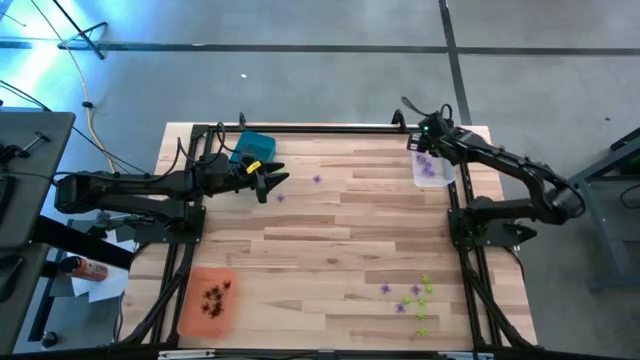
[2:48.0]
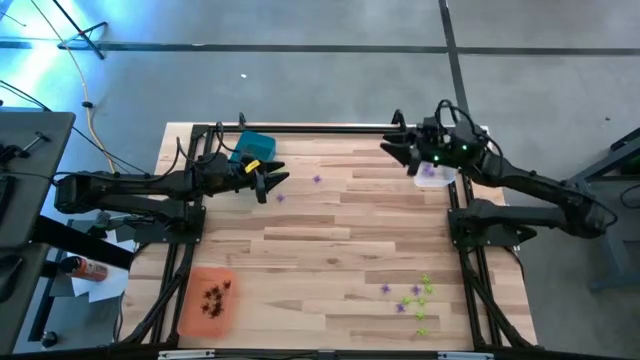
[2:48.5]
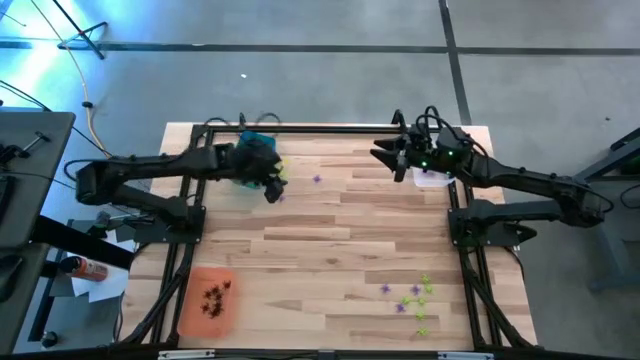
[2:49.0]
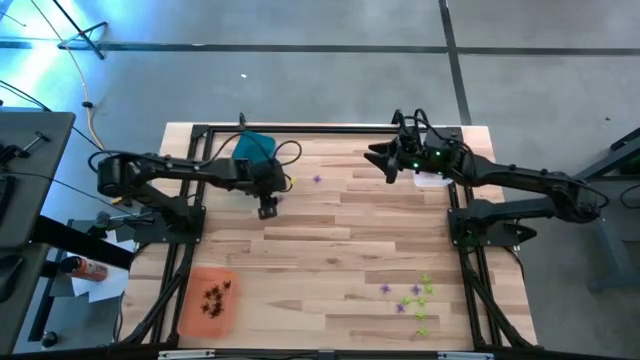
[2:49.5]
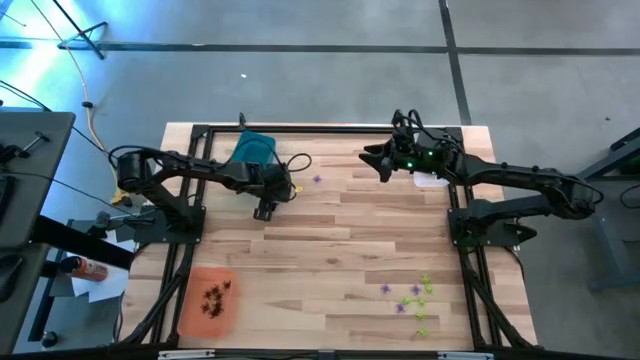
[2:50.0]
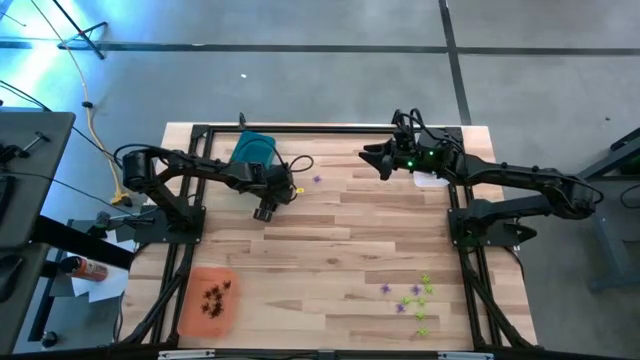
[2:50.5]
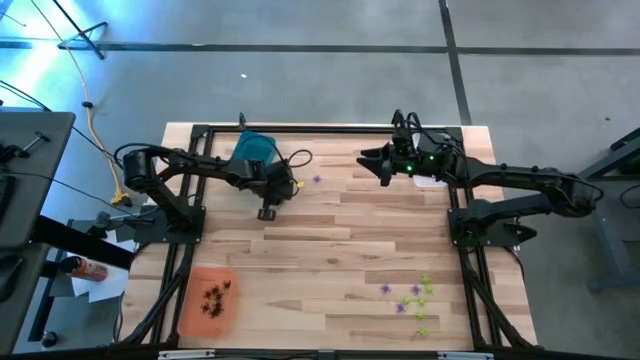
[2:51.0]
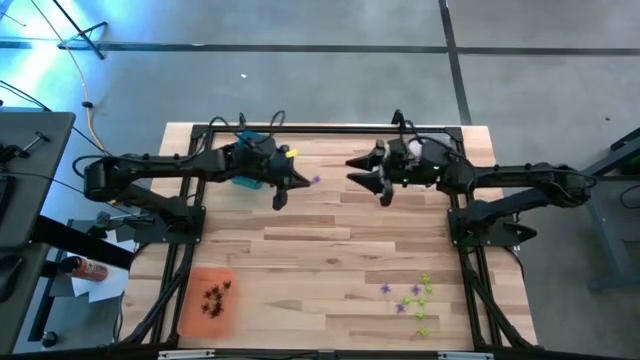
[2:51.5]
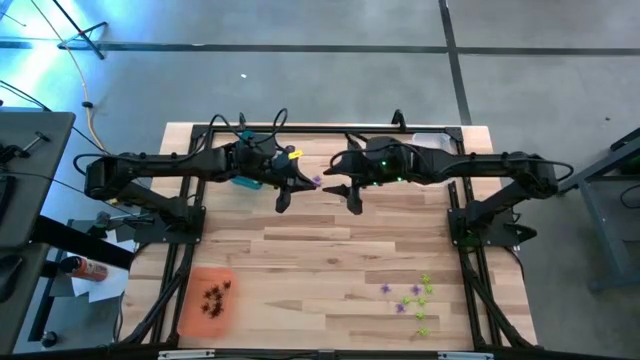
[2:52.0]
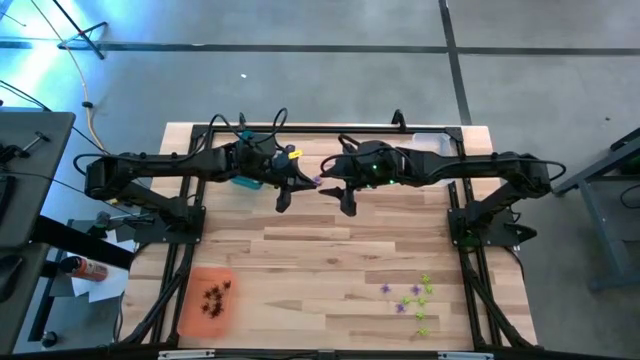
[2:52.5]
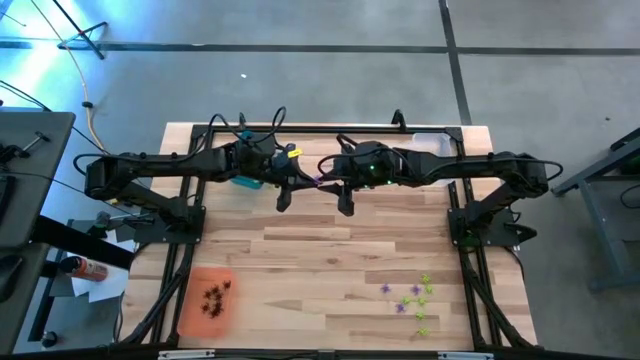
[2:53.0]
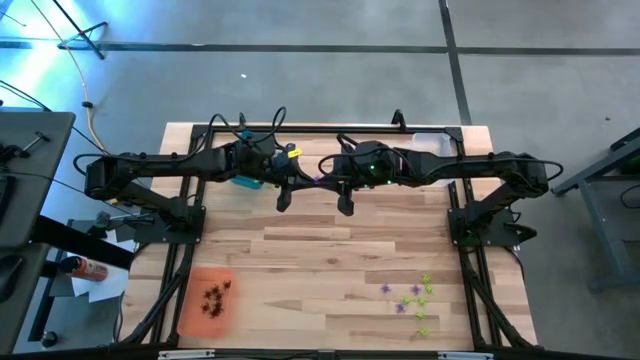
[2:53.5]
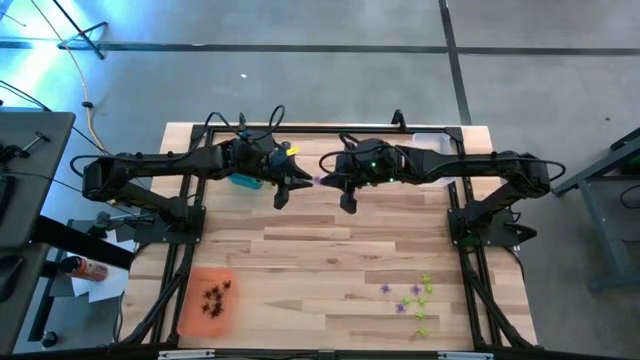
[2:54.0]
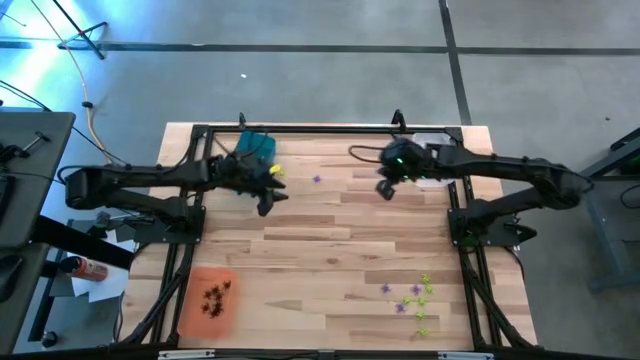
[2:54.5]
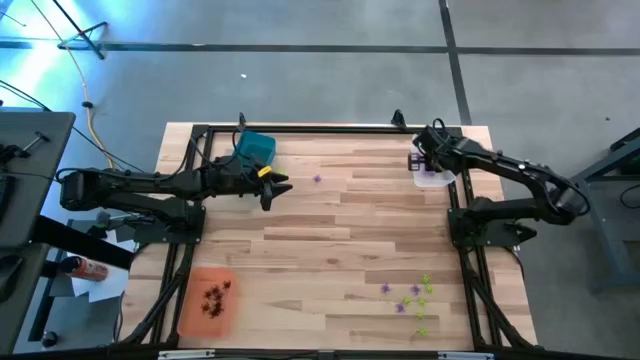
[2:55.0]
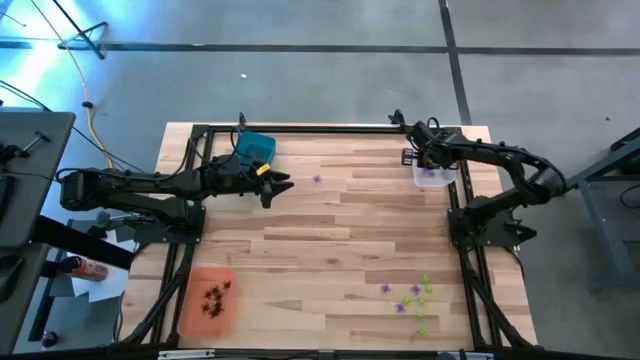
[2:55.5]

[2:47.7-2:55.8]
Task: Sort Halloween decoration
Put the purple spider toy into the transparent bin

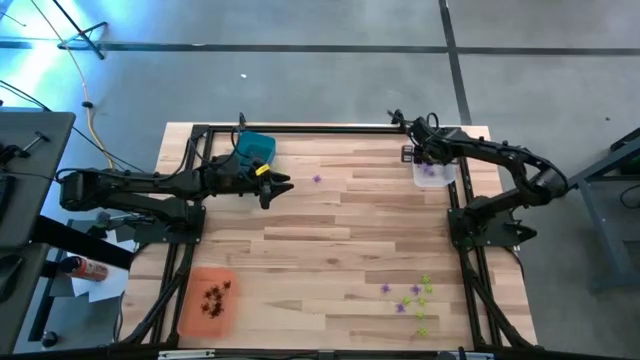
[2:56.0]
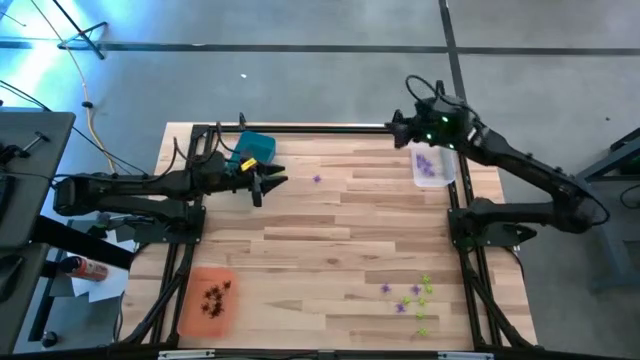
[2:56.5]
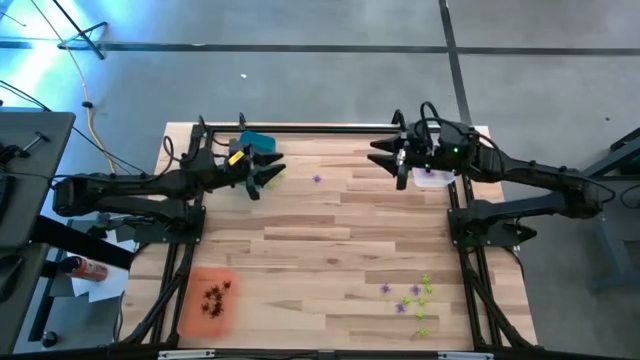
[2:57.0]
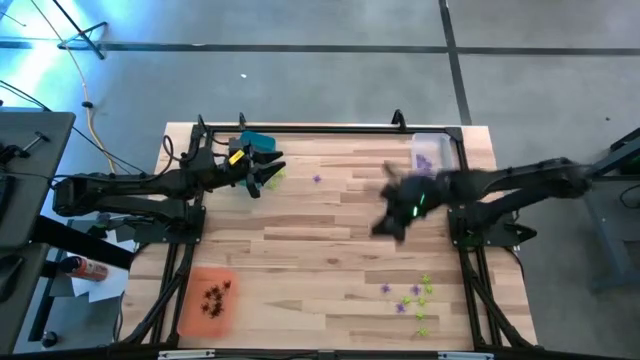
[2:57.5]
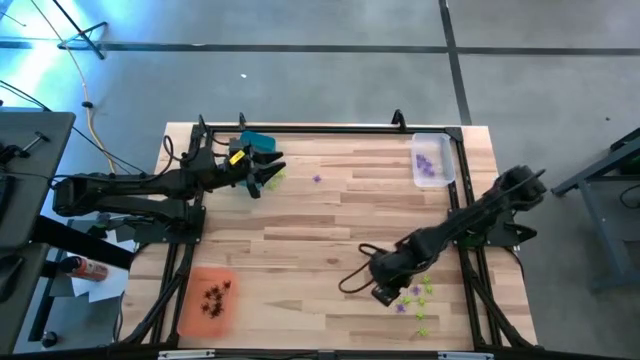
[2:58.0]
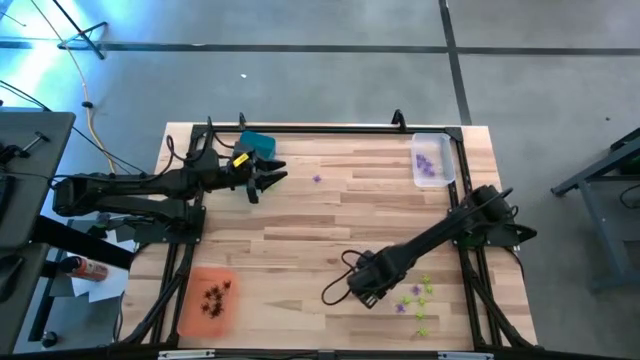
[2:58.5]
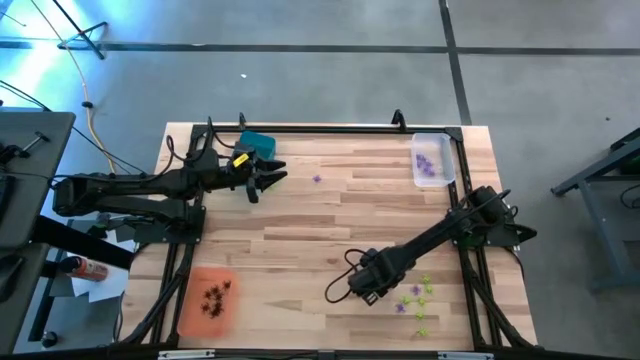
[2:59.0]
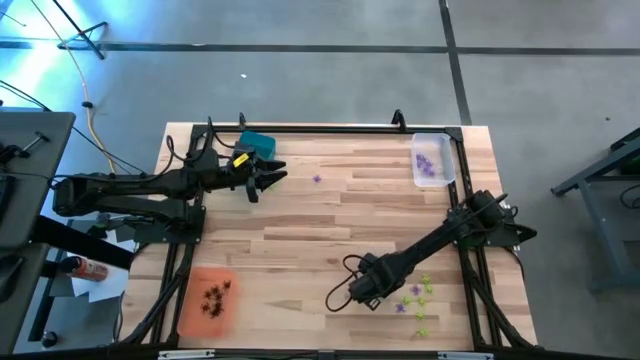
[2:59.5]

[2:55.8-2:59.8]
Put the purple spider toy into the transparent bin

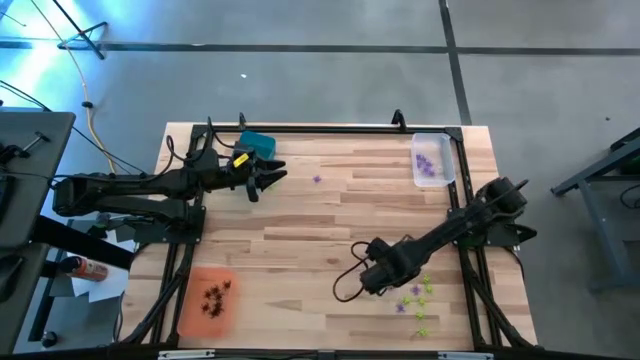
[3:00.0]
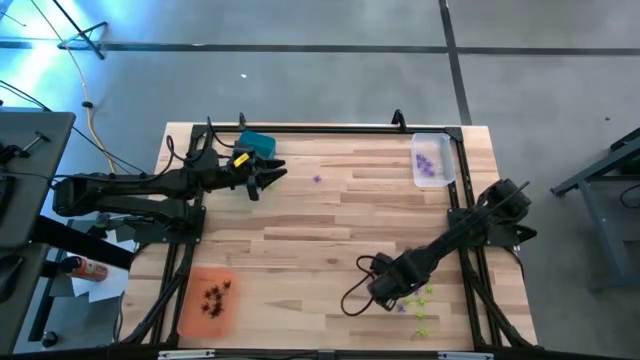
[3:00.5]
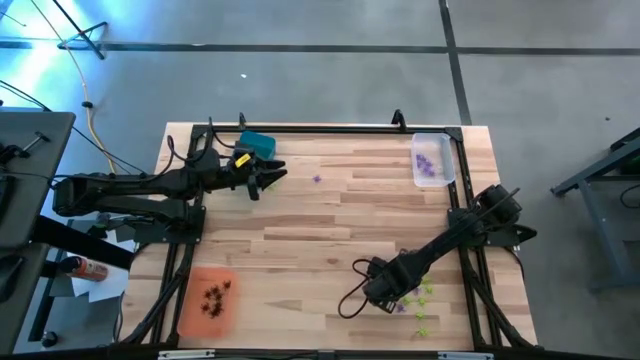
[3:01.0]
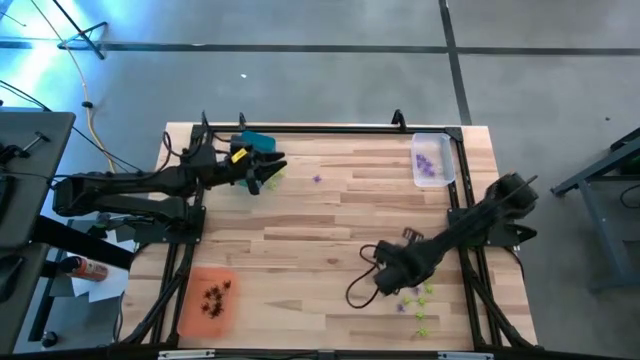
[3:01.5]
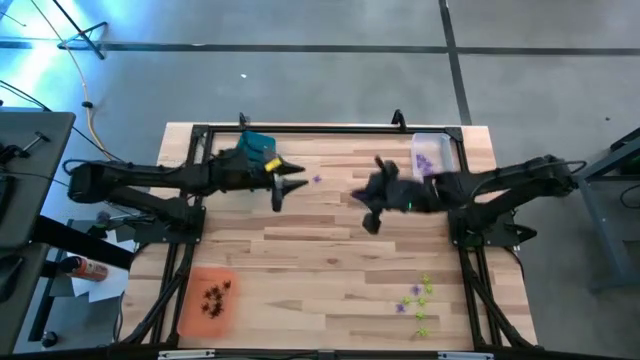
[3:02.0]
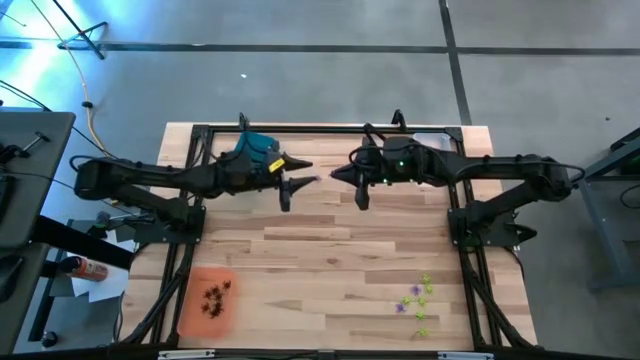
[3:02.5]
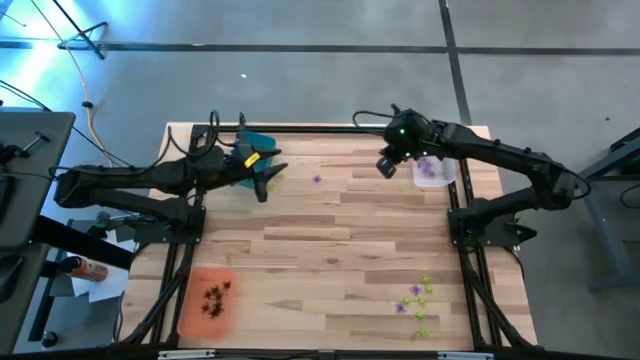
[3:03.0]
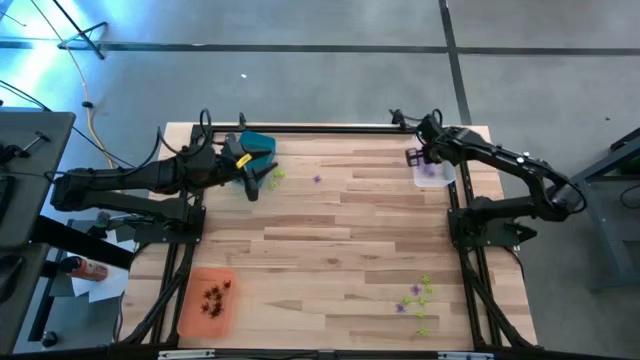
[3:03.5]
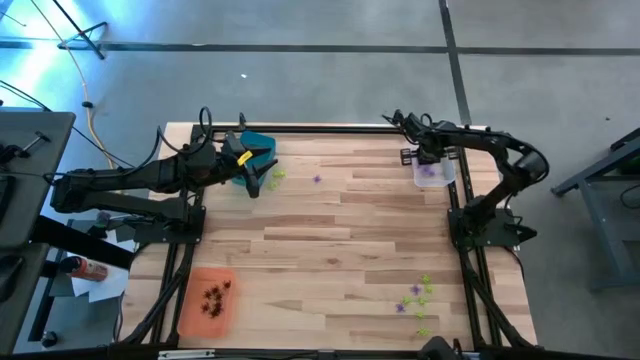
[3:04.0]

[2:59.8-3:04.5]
Put the purple spider toy into the transparent bin

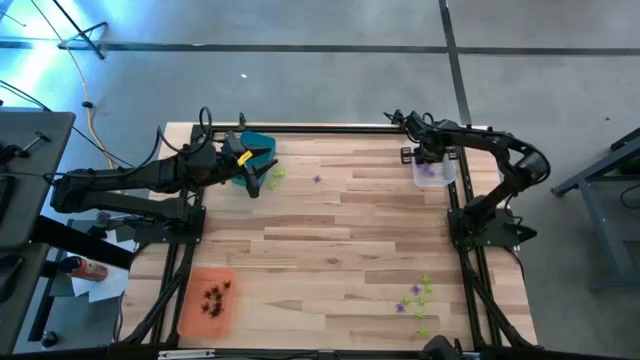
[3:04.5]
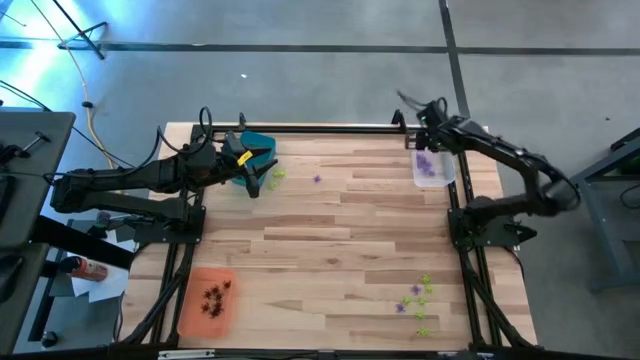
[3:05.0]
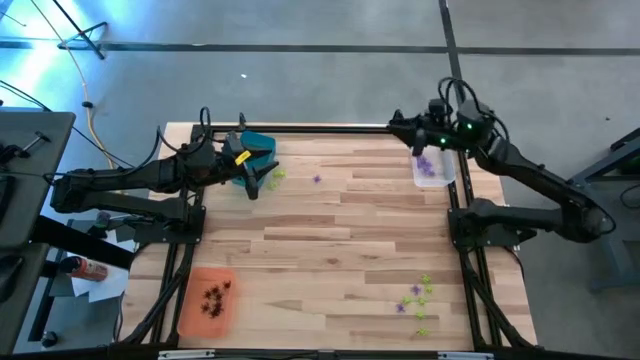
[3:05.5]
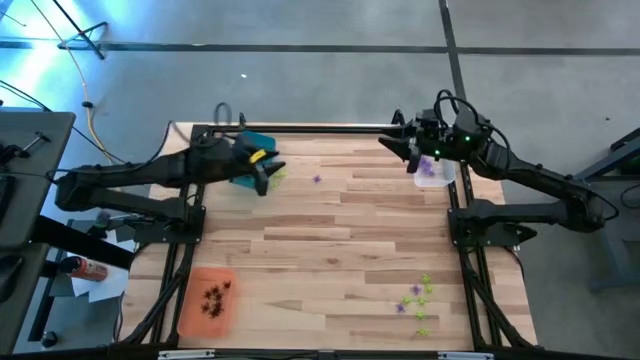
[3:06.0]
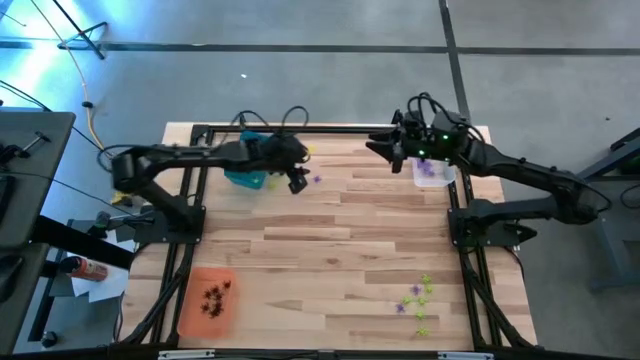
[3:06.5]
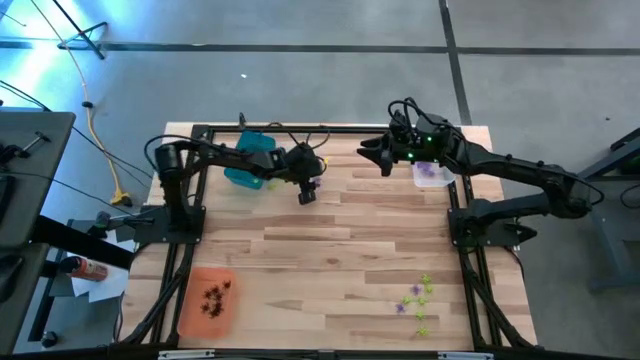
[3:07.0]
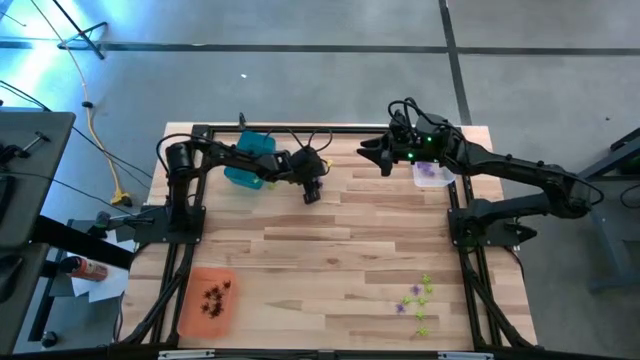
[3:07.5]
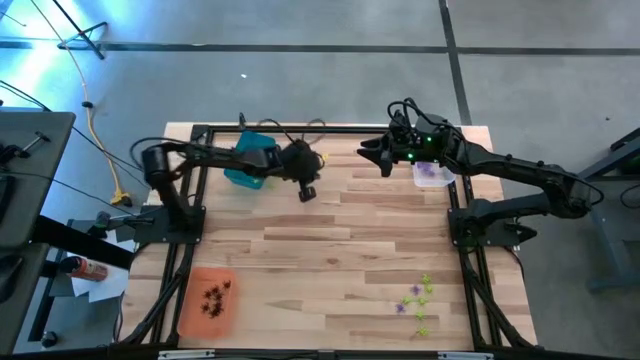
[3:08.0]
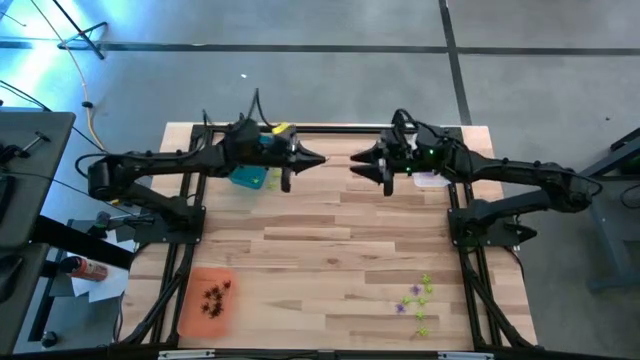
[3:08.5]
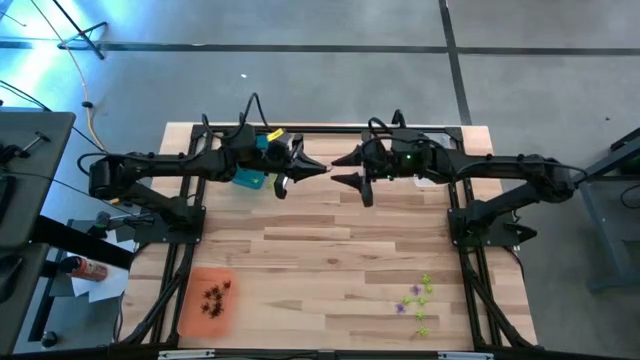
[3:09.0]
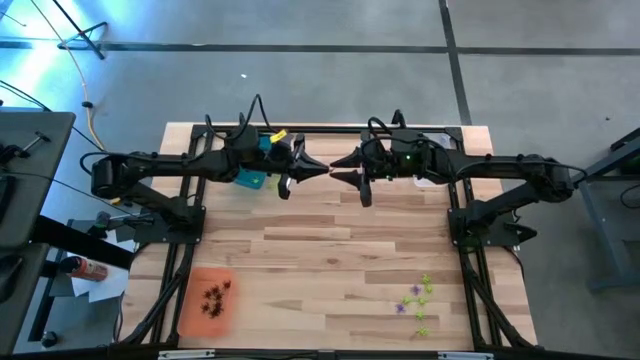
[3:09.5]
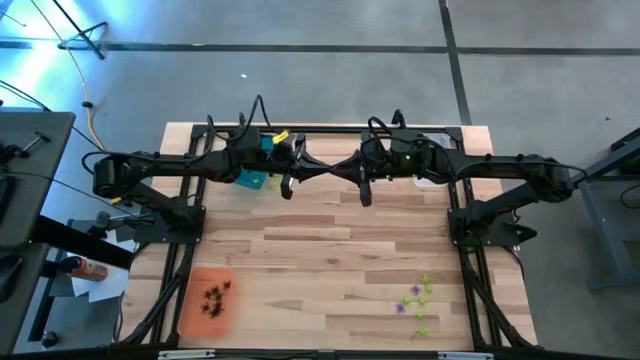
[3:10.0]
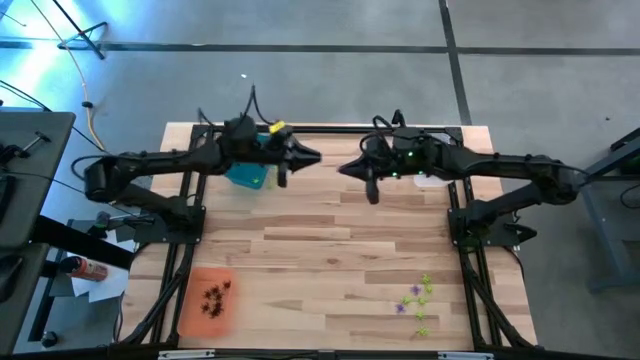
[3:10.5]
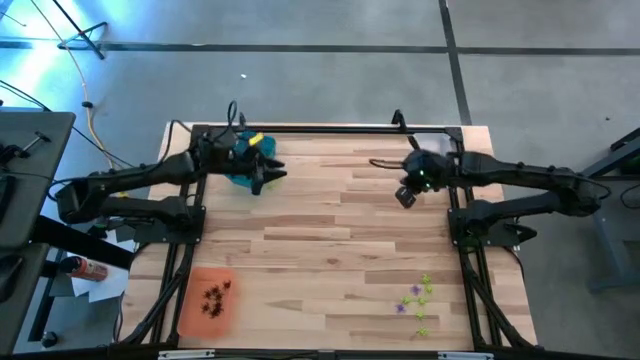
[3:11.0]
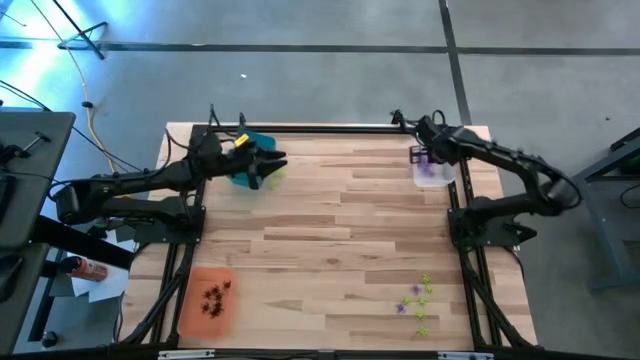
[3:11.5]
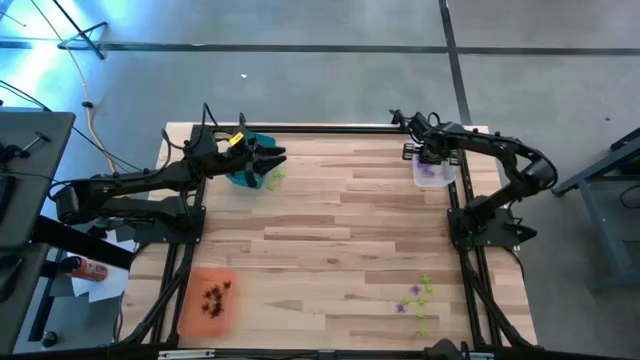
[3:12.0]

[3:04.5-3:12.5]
Put the purple spider toy into the transparent bin
